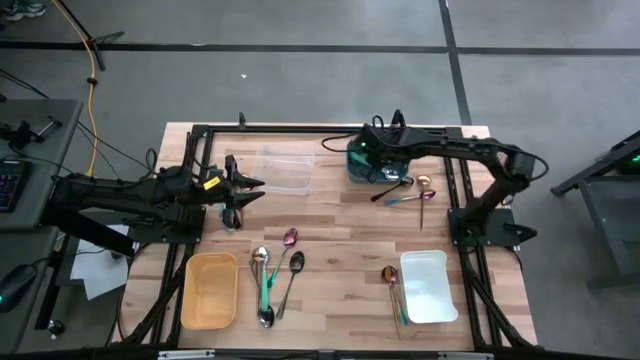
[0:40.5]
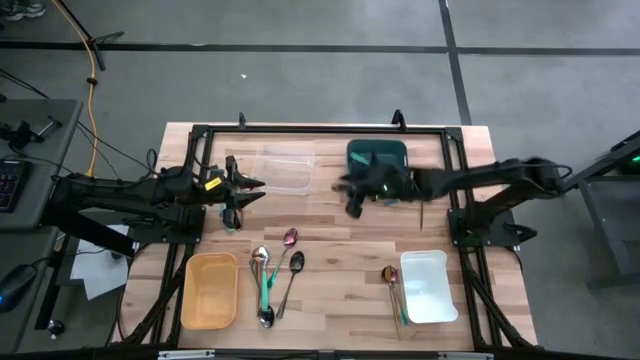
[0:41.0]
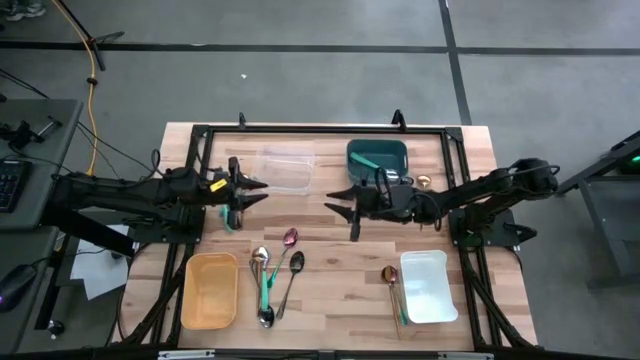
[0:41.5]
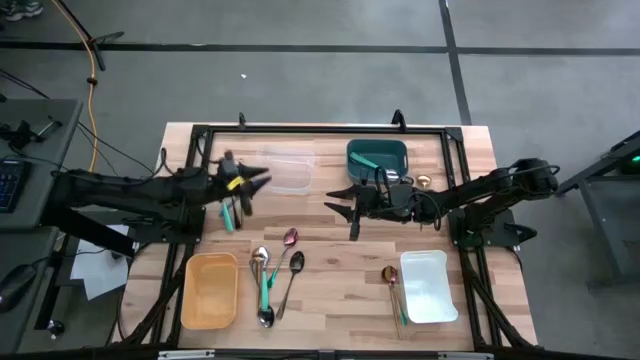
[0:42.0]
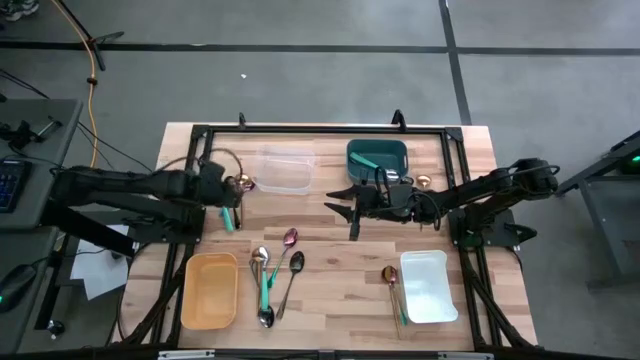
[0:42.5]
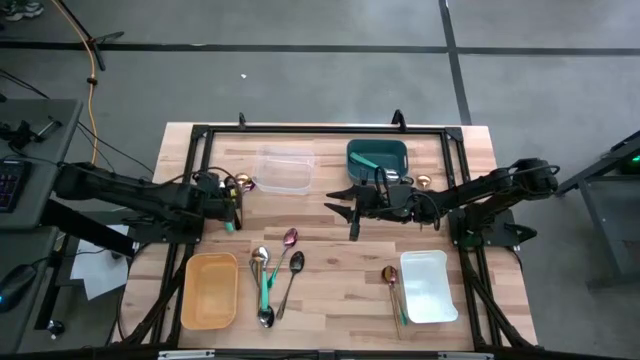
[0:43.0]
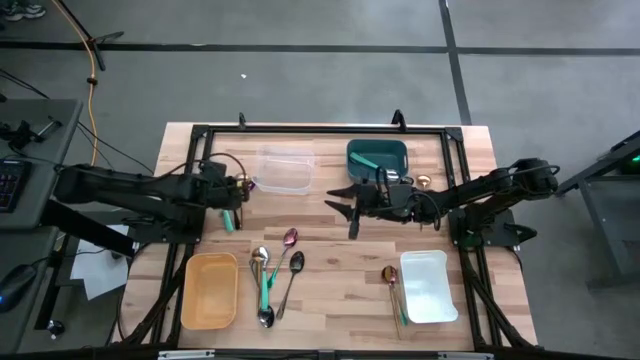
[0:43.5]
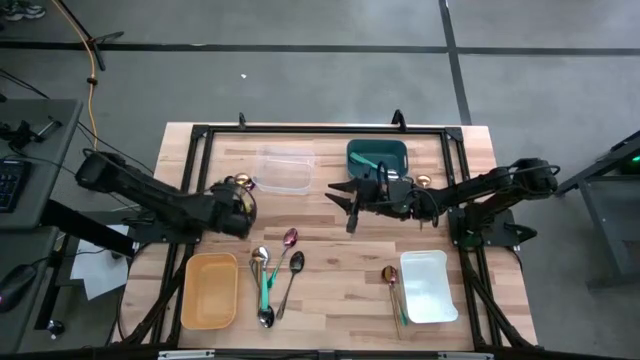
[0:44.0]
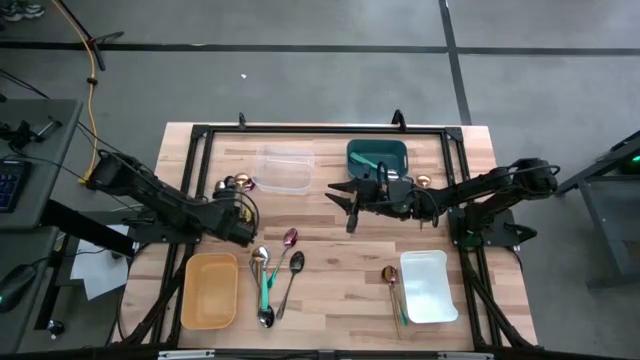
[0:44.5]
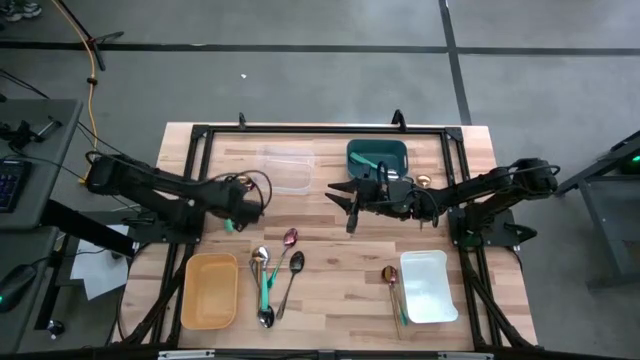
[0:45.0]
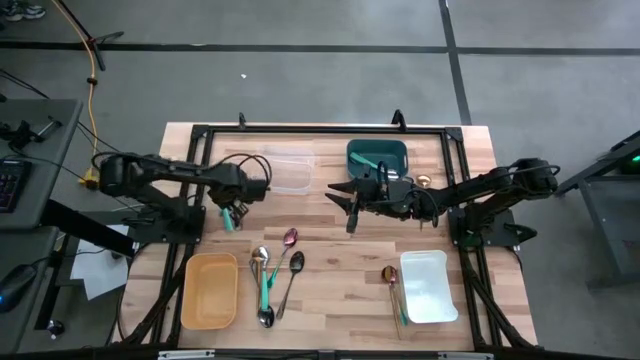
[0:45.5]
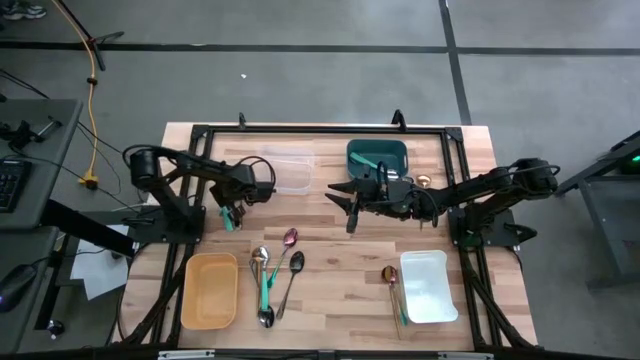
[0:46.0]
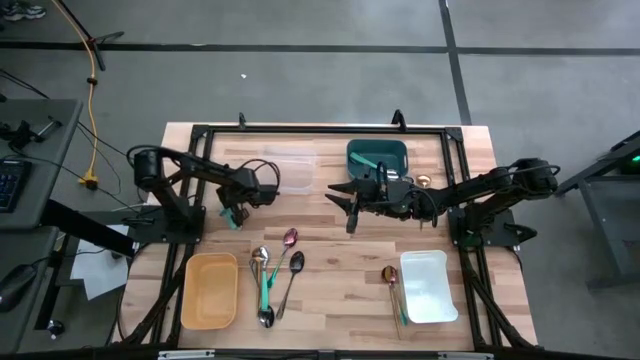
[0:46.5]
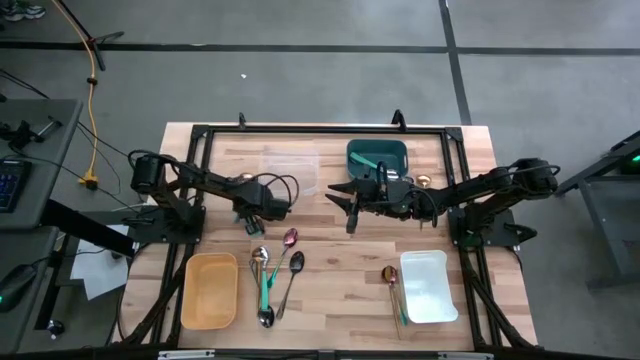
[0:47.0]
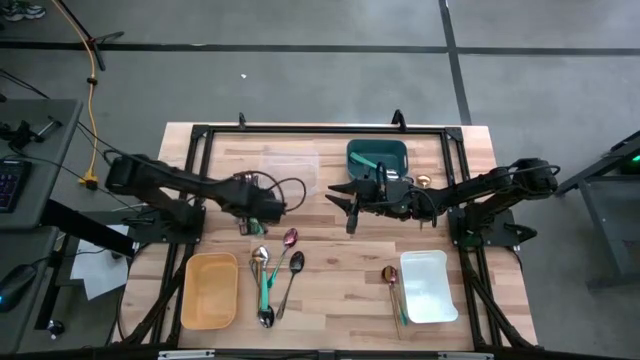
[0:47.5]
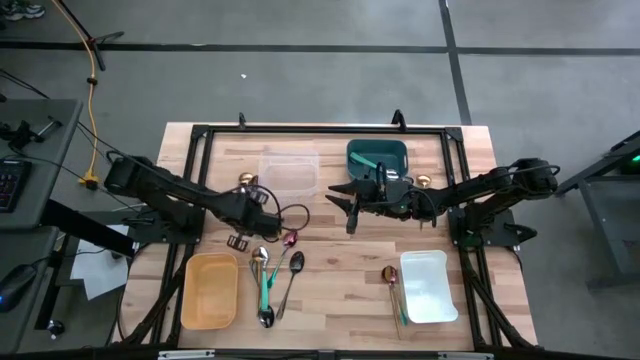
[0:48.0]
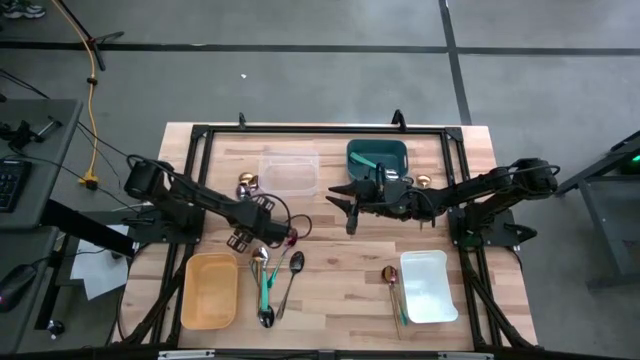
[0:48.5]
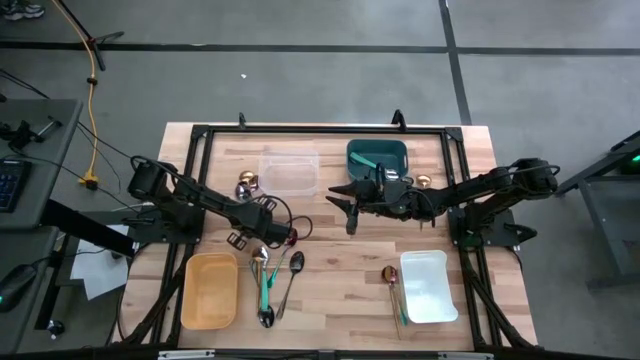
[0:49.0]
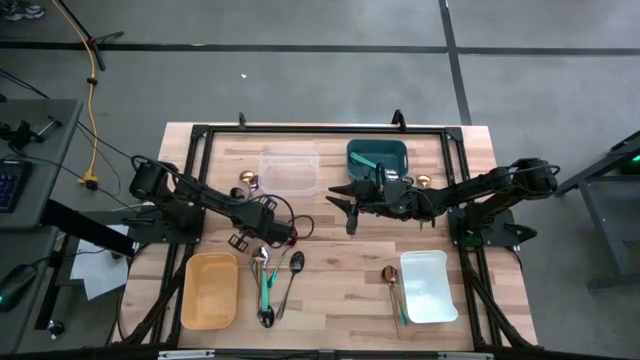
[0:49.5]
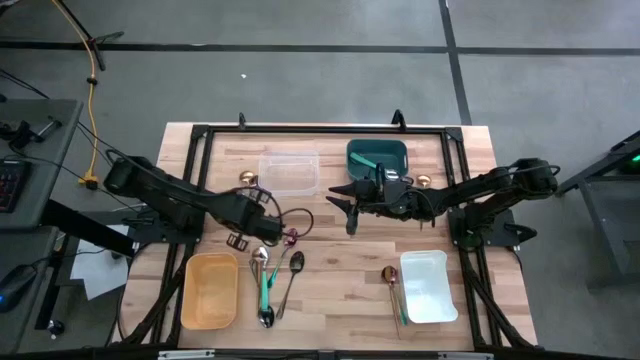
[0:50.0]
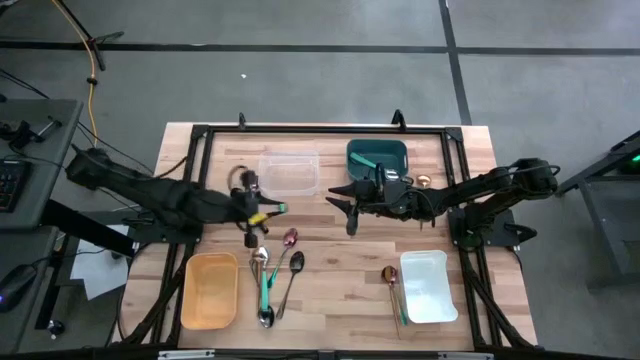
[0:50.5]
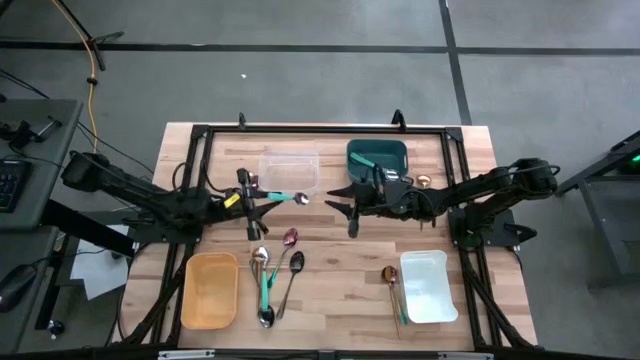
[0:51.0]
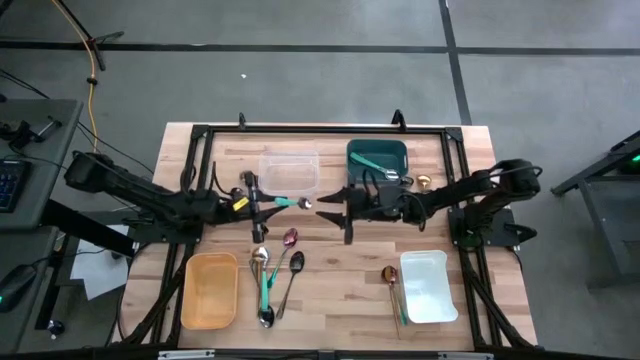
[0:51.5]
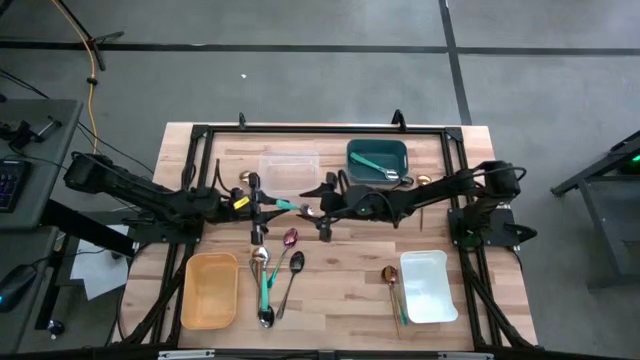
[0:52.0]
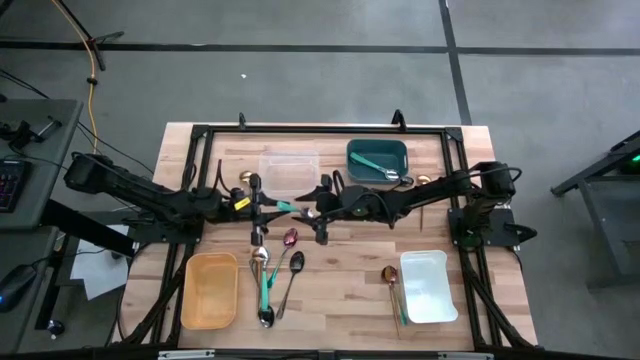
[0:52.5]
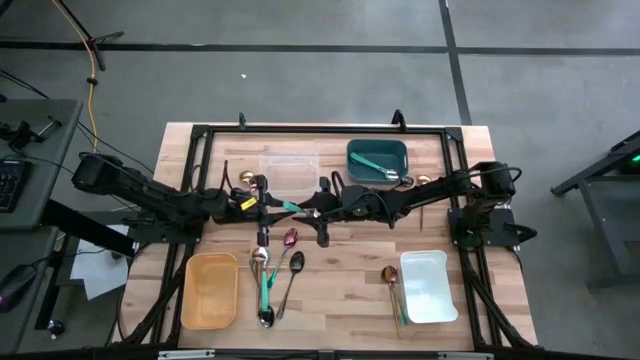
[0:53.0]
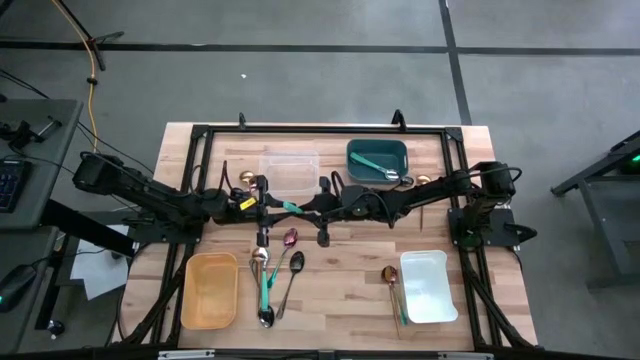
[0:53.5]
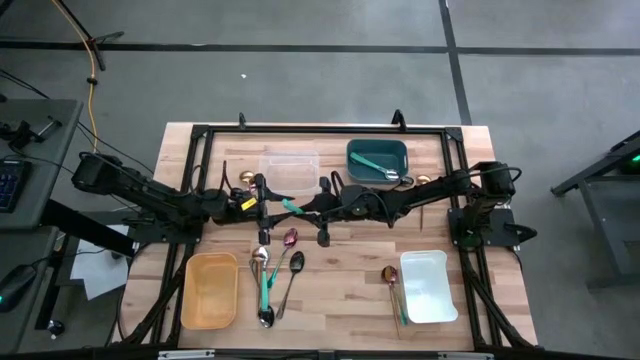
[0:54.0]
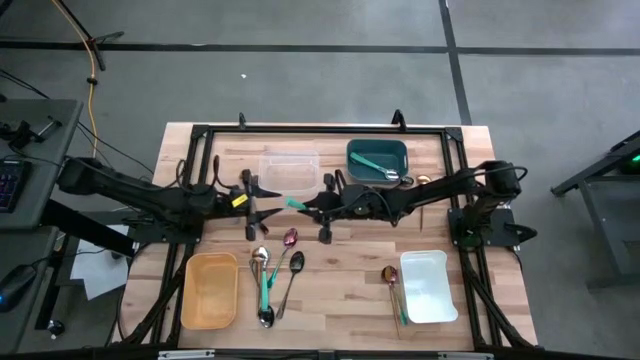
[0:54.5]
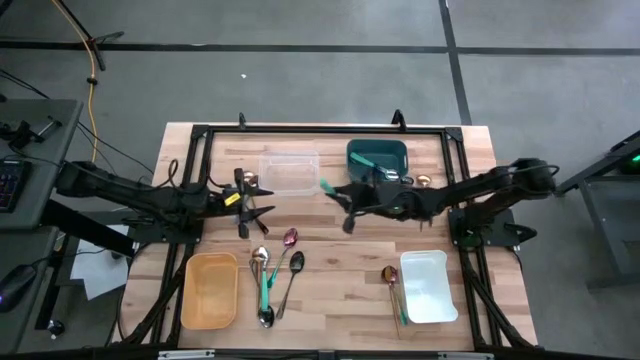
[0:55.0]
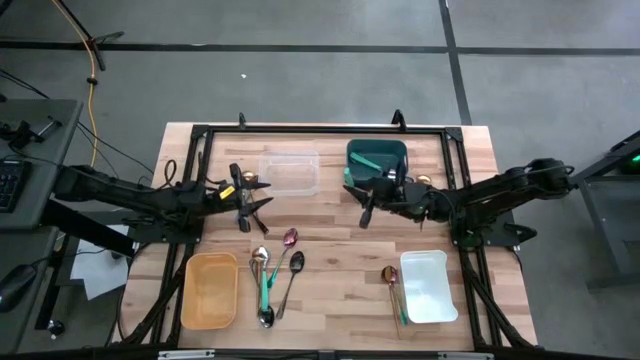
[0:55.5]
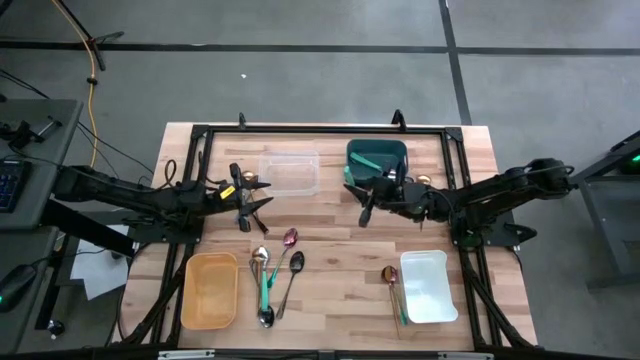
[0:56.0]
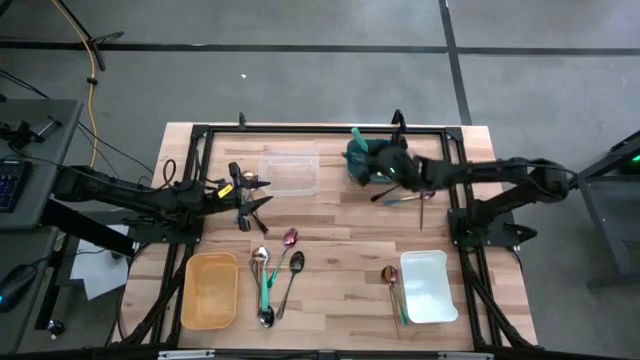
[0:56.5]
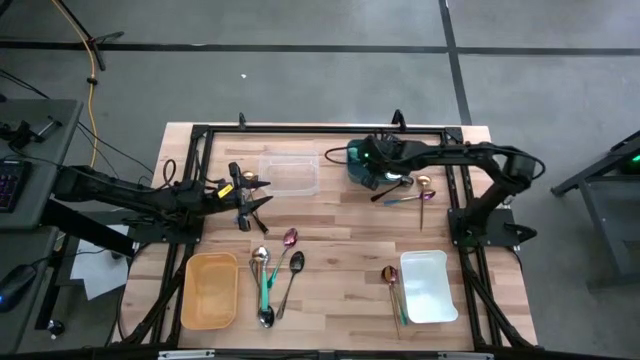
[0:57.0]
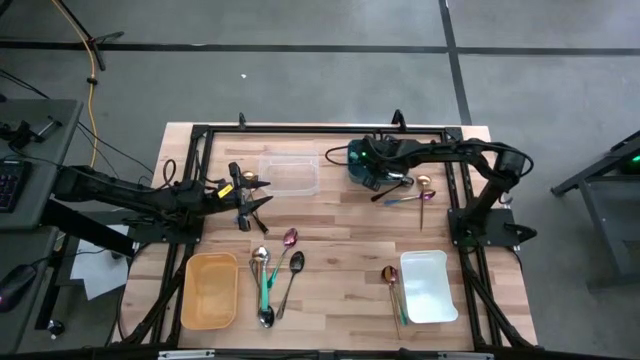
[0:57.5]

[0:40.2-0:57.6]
Task: Sort silverware by color (type)
Put the green spoon into the blue bin

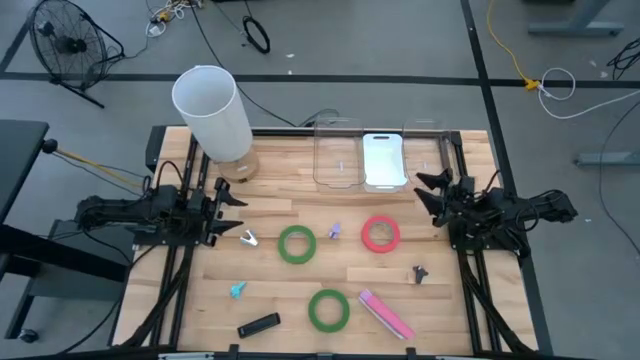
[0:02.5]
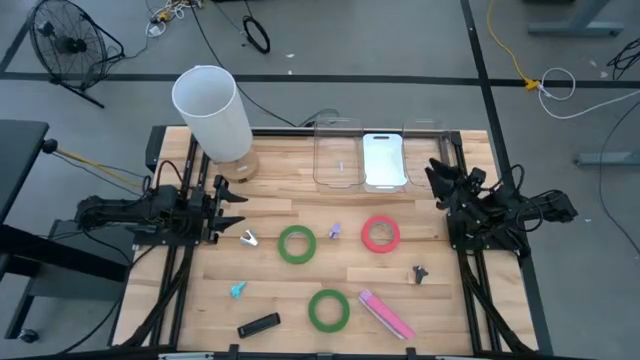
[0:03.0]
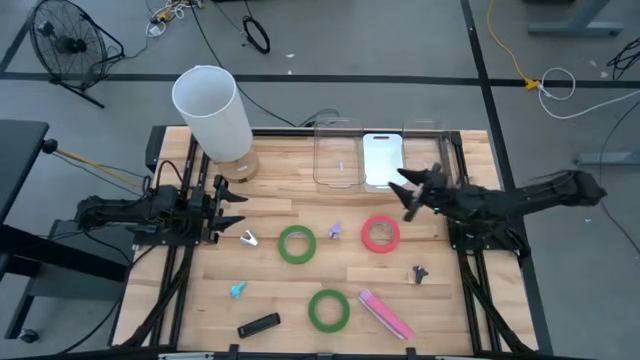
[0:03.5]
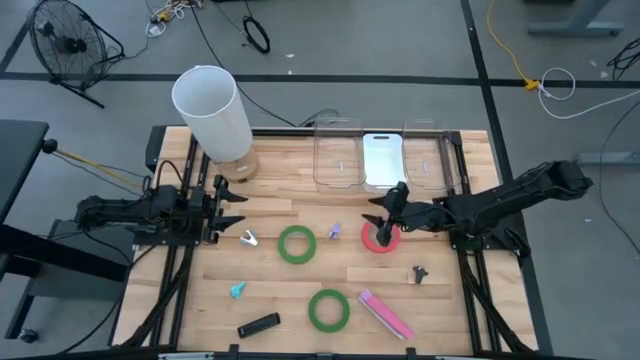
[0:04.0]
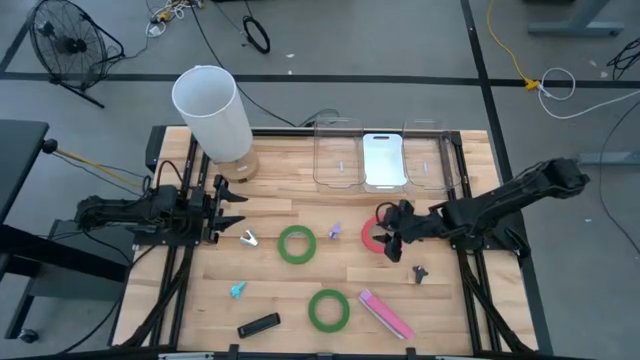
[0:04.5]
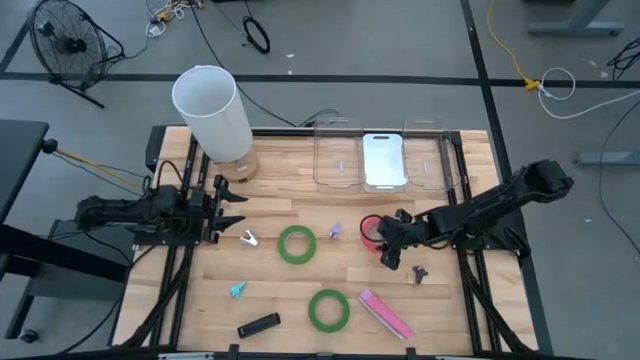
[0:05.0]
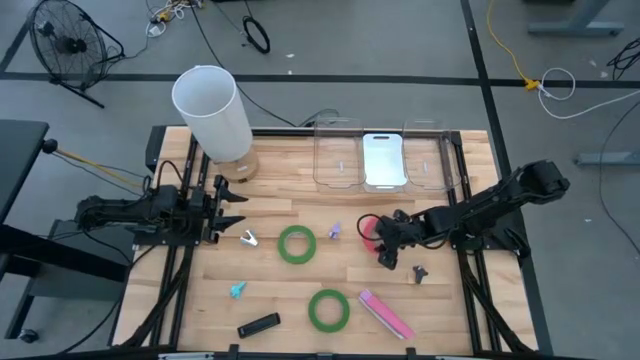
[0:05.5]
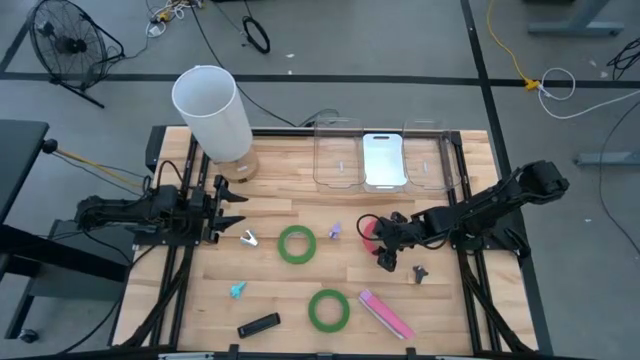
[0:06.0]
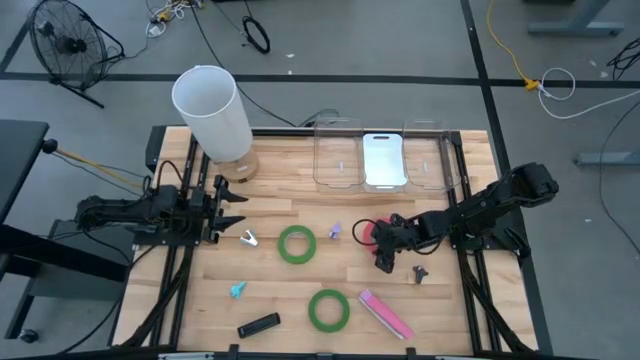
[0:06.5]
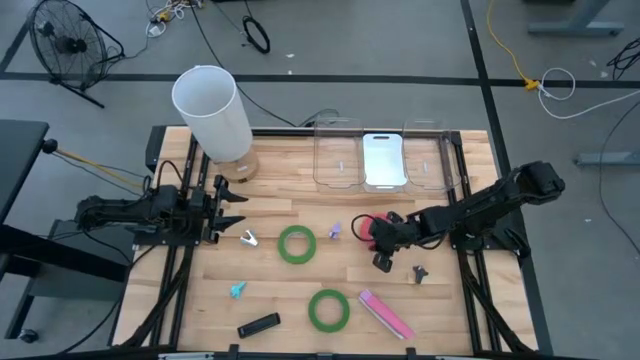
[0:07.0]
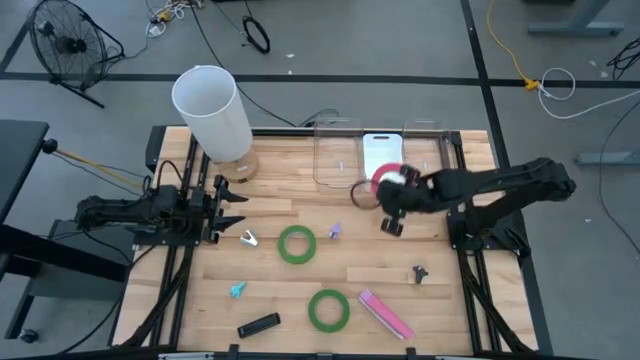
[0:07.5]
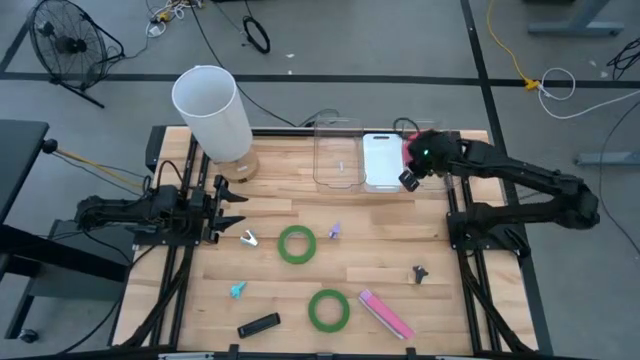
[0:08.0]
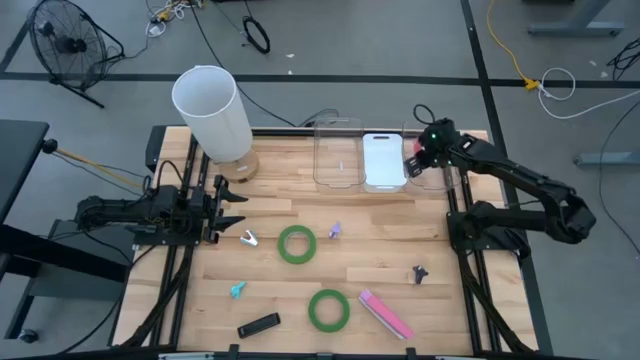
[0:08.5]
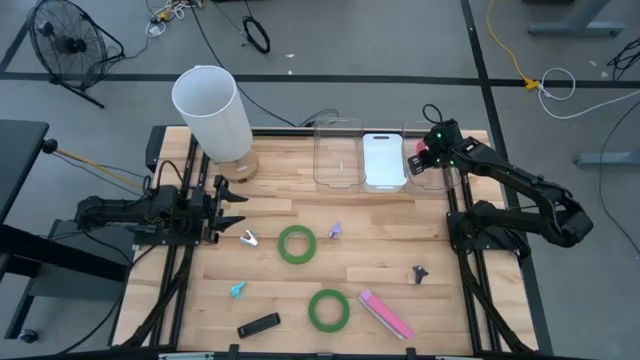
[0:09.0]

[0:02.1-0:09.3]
Task: Pick and place Stapler, Stapler remover, tape
Put the pink tape into the right transparent bin
